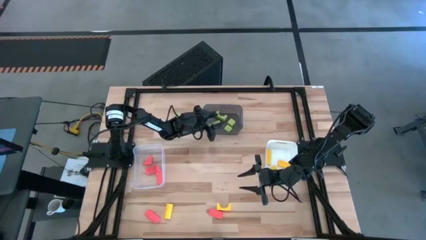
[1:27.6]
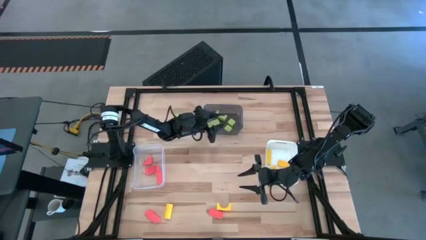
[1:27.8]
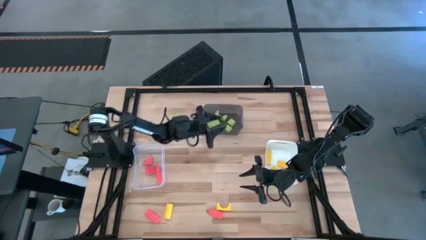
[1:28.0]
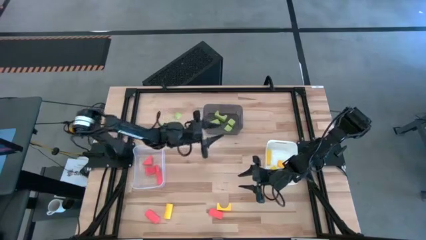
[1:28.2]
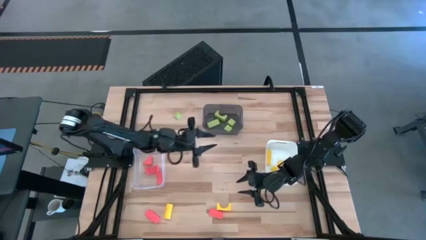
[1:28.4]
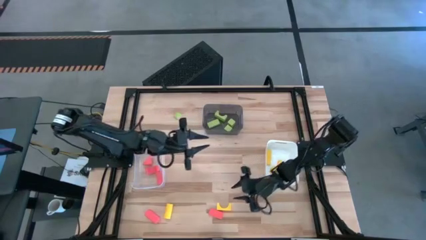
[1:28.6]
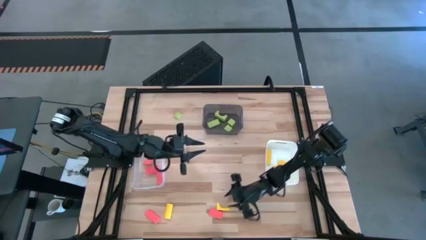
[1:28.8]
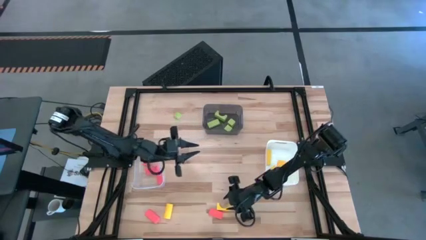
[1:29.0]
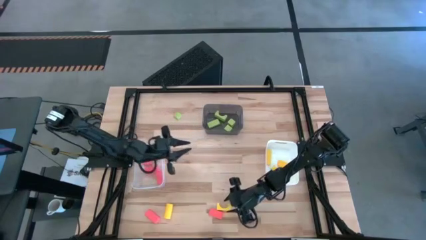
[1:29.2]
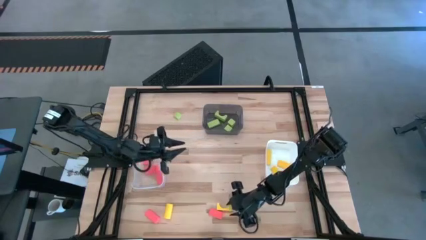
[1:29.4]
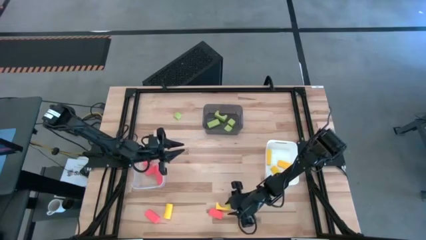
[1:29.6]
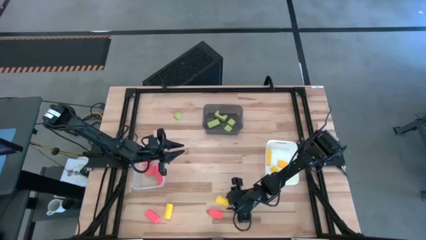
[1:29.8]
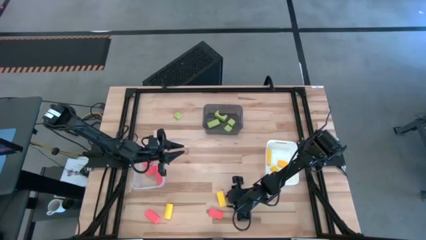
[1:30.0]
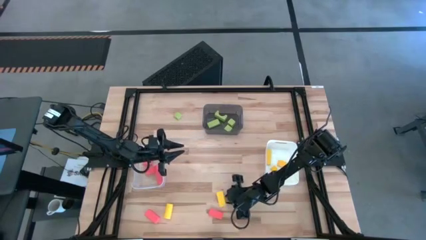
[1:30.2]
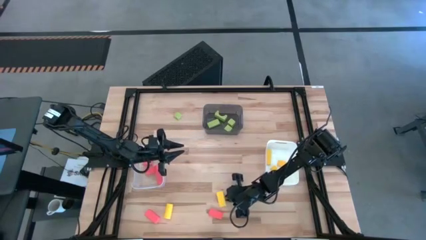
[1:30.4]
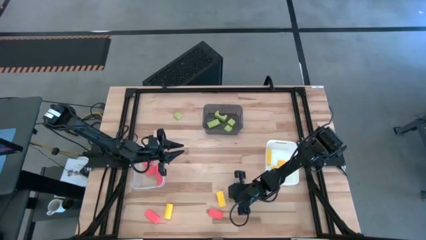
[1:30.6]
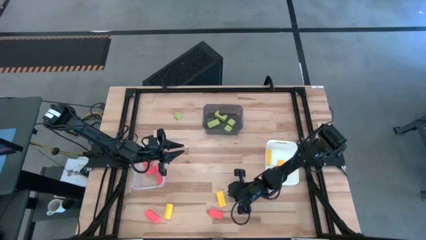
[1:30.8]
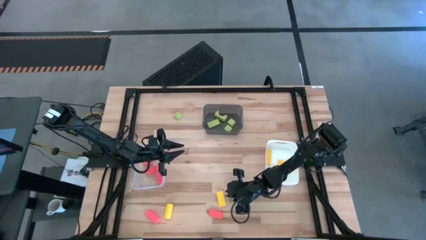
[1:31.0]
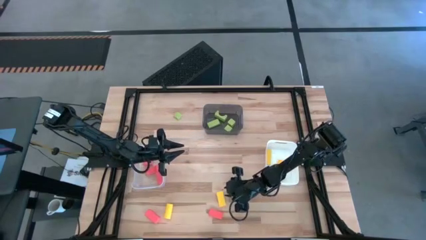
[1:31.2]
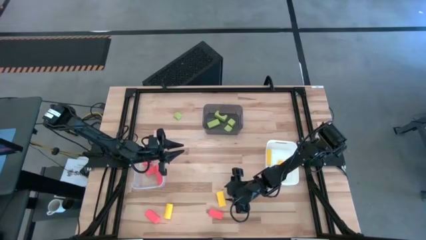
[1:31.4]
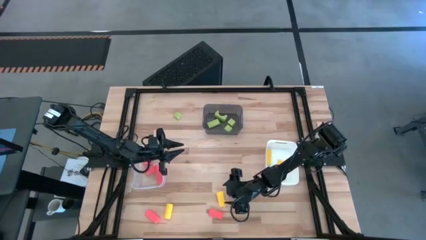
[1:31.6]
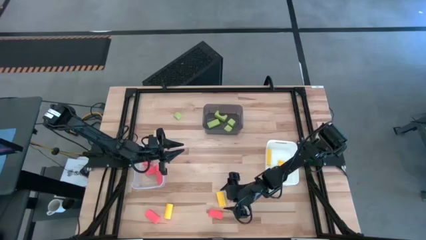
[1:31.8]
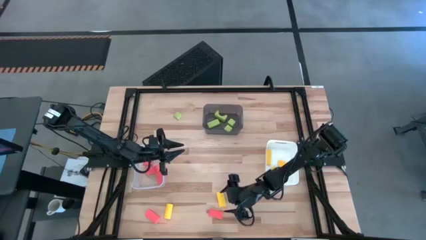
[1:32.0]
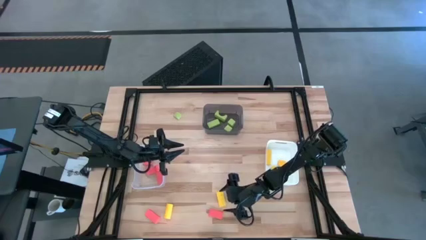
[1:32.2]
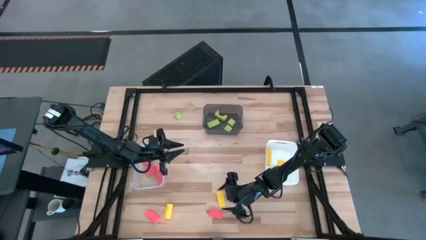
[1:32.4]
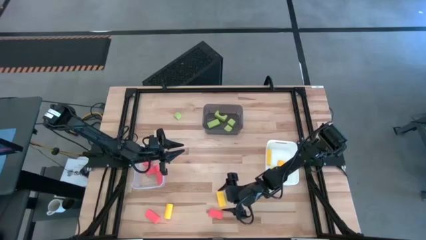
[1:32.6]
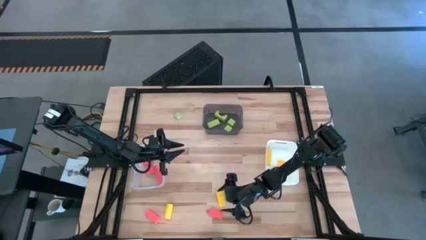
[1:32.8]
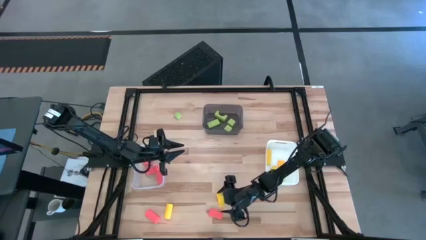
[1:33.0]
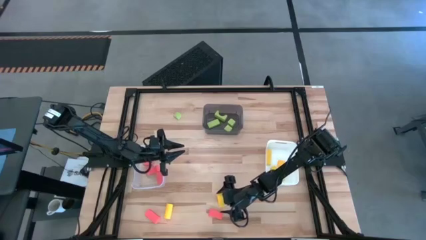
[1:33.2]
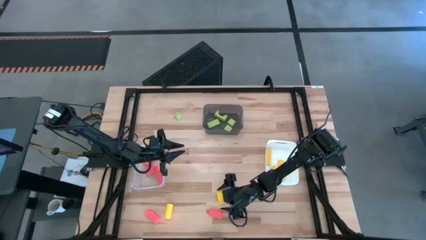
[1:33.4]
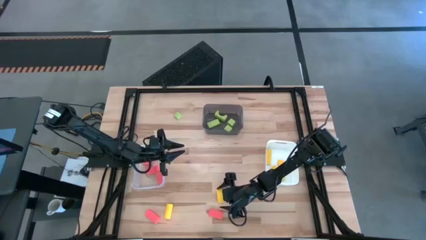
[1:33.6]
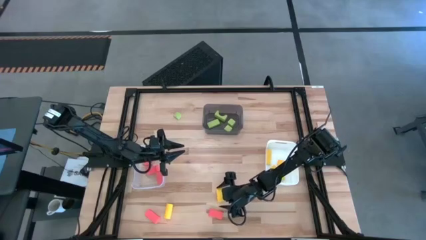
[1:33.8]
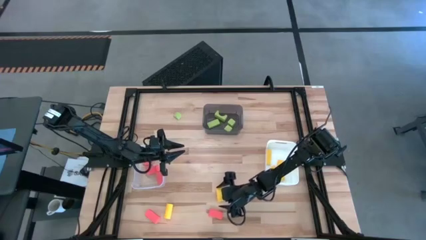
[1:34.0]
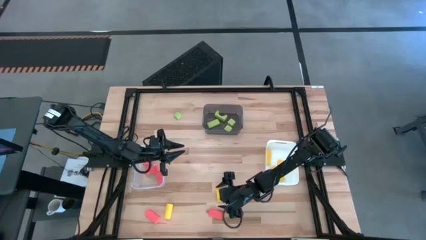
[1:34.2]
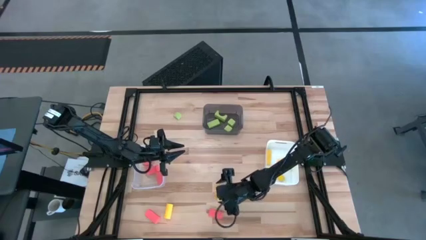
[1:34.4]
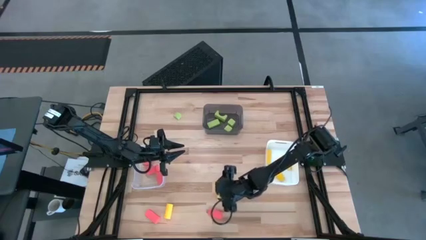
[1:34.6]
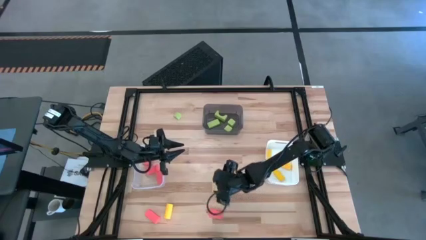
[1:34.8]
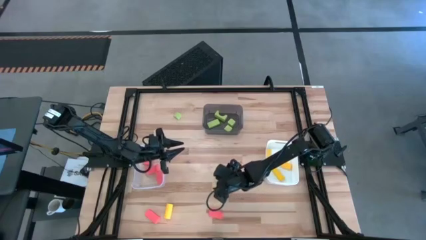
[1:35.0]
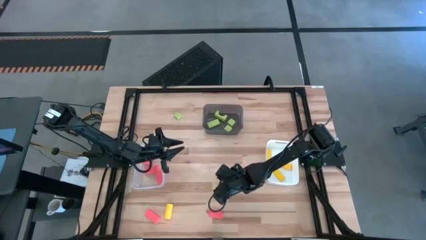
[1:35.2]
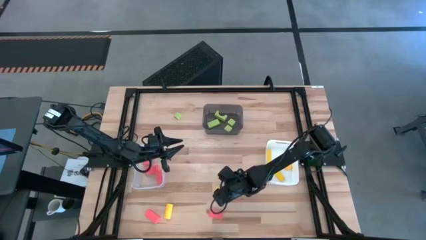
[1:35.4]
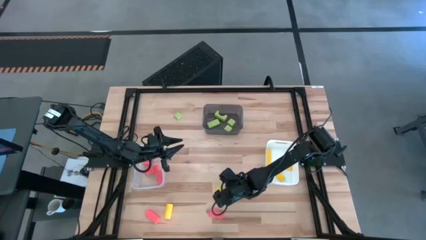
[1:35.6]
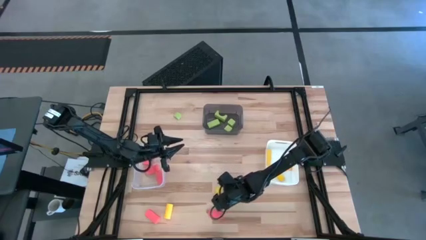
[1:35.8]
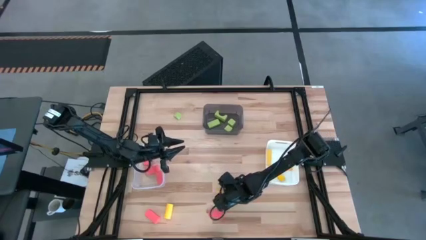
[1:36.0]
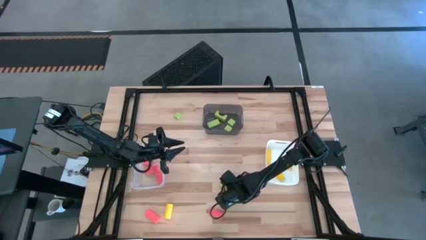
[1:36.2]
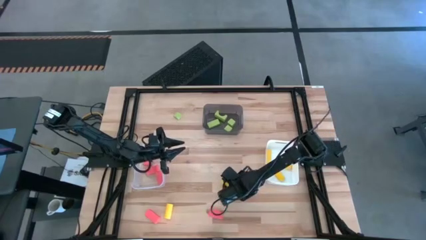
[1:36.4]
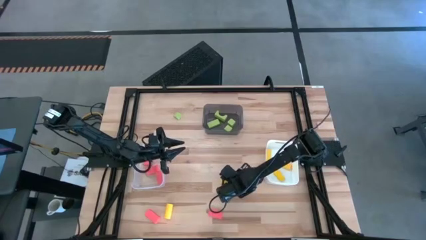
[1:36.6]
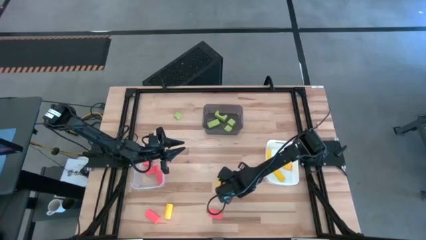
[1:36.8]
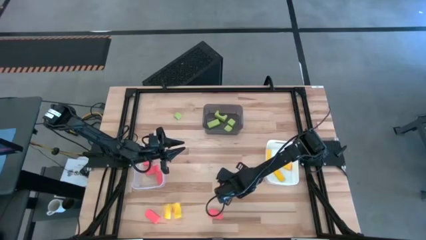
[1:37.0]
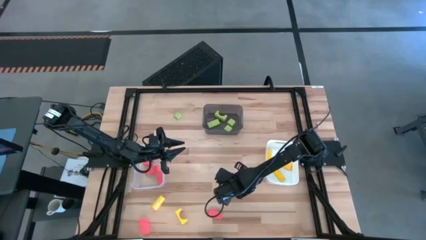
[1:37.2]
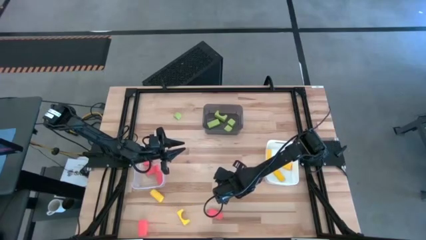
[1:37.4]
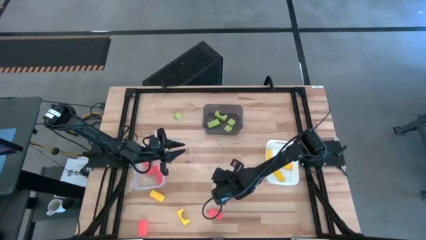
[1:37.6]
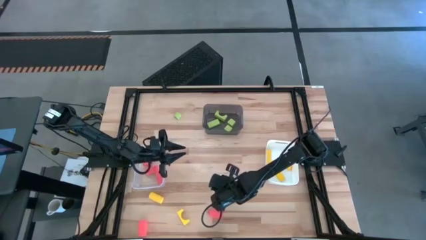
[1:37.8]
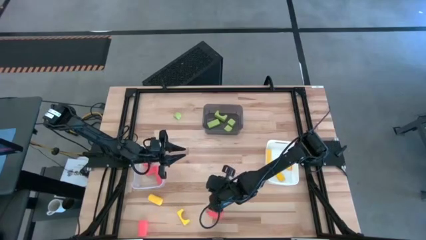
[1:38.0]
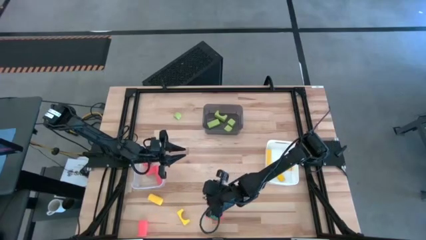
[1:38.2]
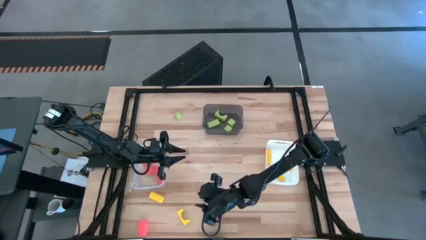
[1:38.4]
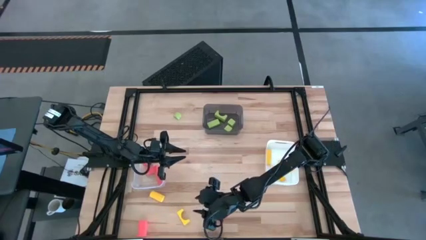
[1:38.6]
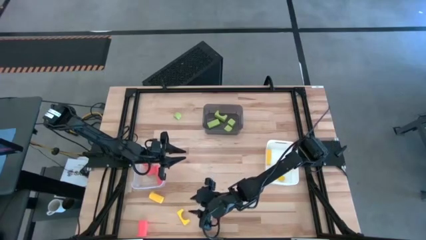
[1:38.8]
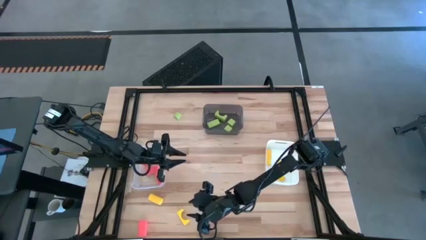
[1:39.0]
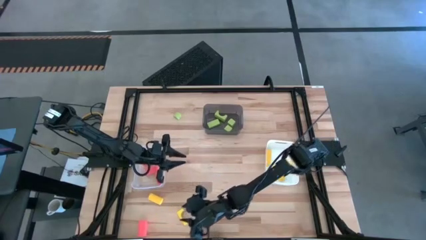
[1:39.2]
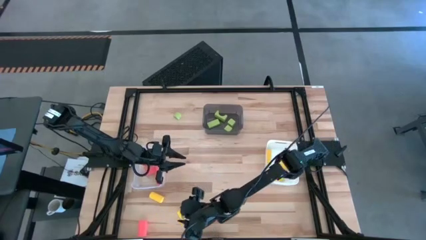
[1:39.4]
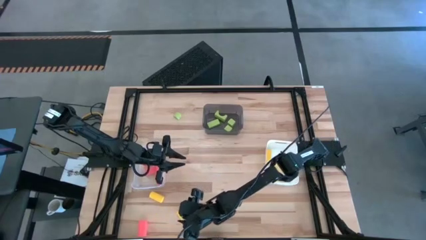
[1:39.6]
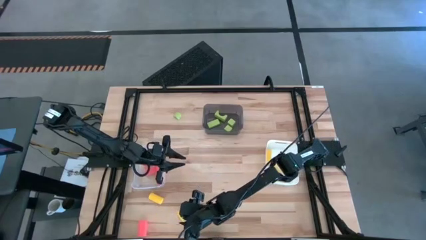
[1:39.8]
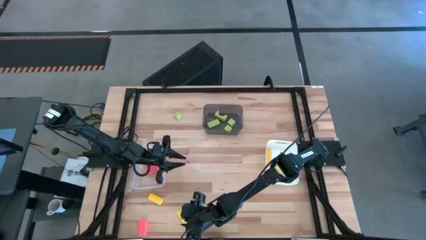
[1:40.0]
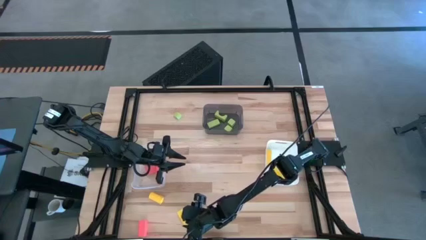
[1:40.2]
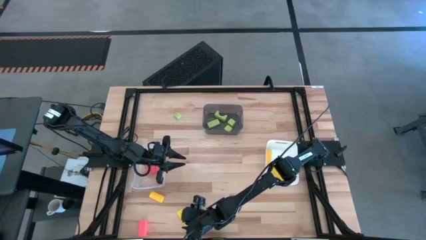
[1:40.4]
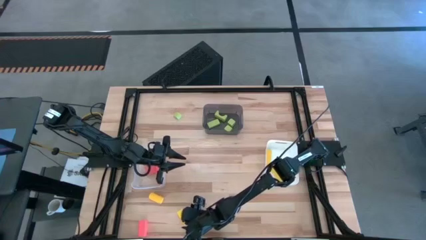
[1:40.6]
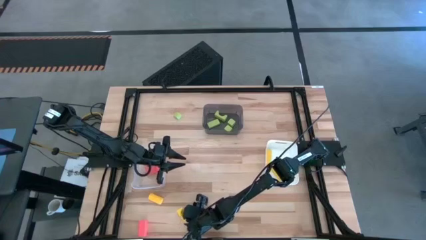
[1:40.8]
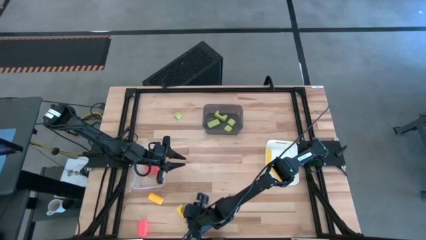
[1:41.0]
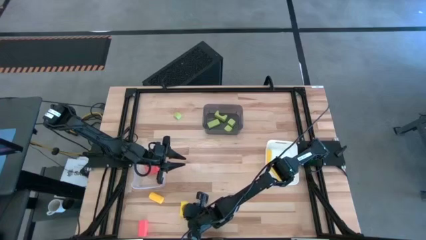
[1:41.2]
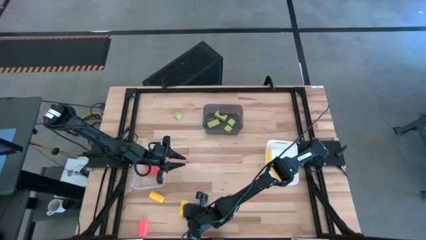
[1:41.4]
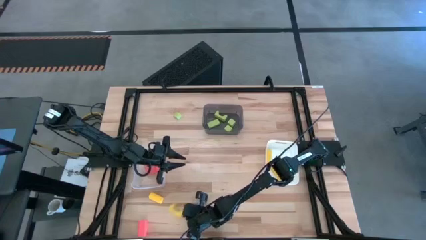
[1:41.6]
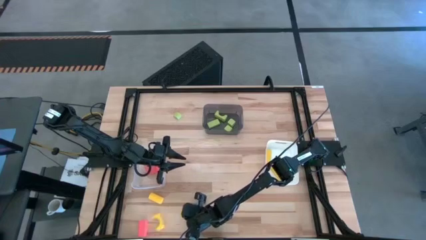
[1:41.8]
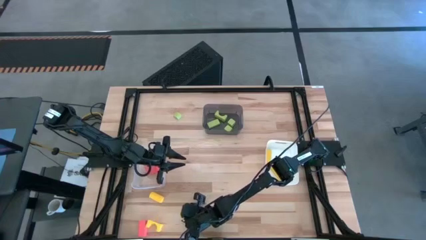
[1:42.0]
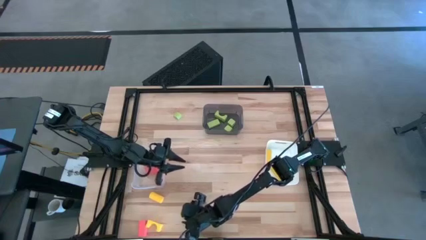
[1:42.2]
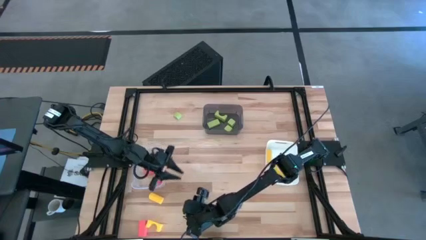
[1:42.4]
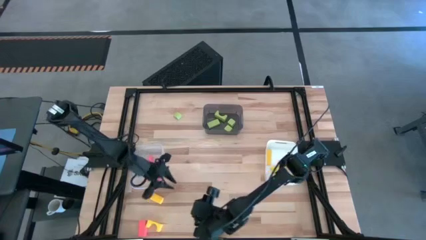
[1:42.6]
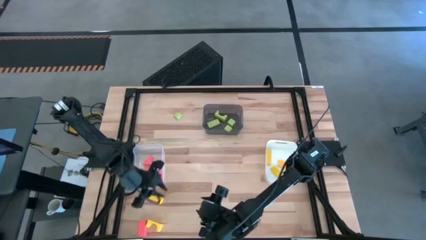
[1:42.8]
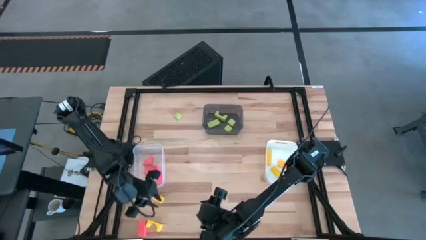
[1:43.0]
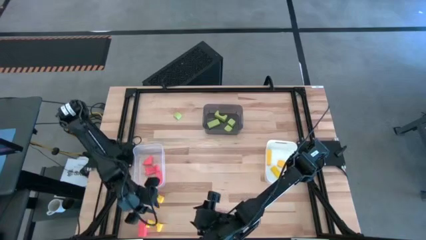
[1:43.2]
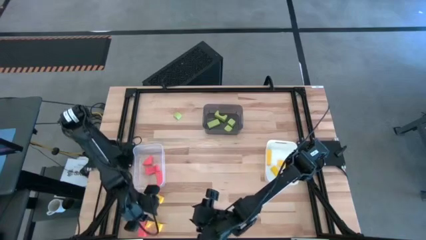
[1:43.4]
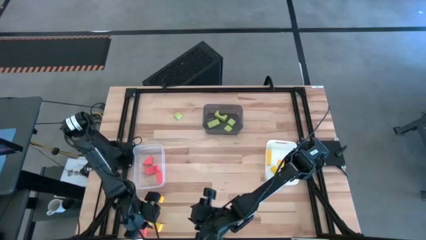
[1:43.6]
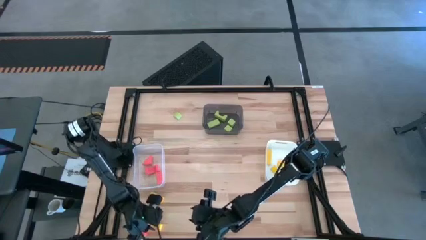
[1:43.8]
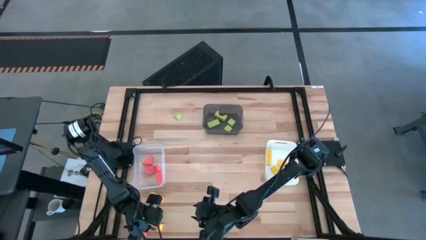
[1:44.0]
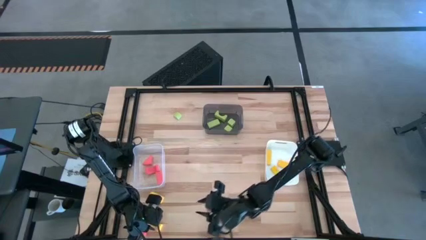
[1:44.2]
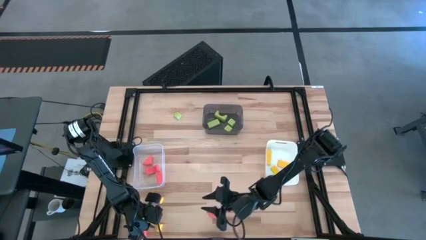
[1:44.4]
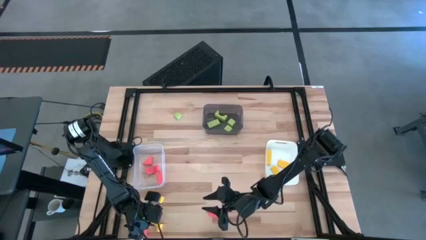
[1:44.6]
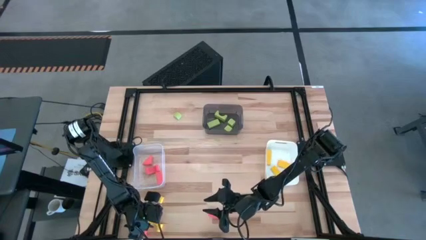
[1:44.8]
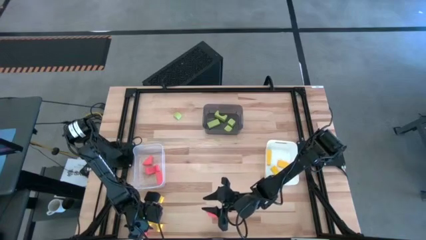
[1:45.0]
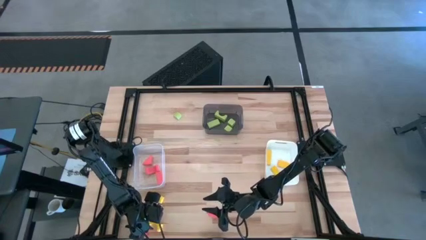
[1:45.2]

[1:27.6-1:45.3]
Task: Sort & place blocks by color
Put the yellow block into the white bin
